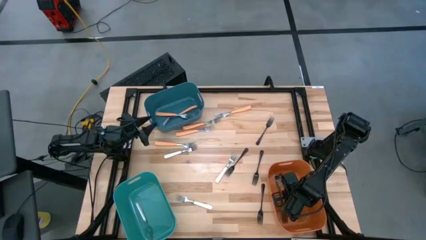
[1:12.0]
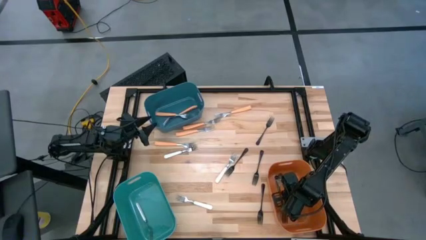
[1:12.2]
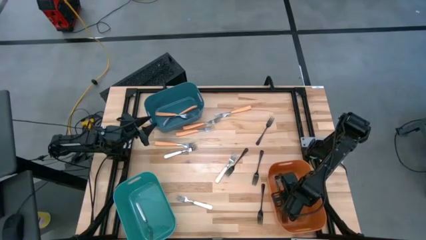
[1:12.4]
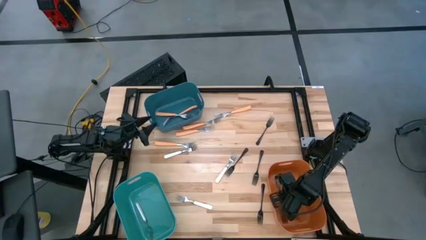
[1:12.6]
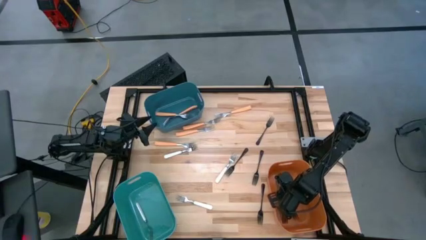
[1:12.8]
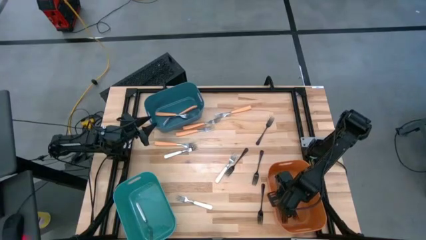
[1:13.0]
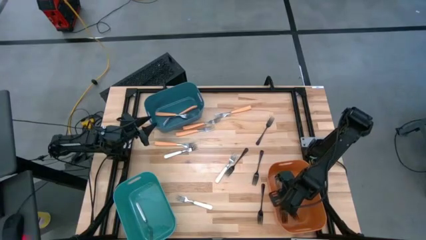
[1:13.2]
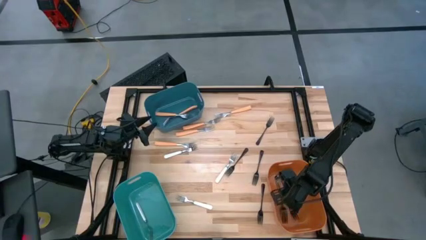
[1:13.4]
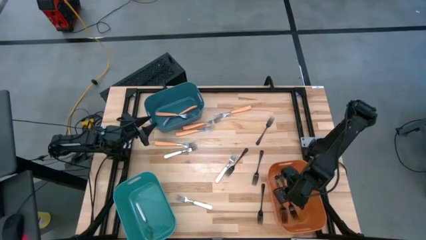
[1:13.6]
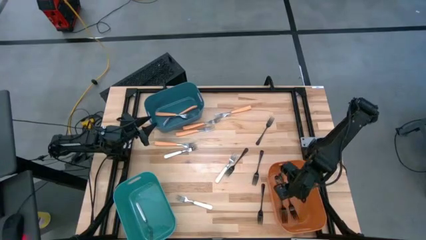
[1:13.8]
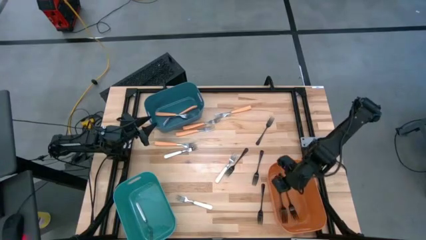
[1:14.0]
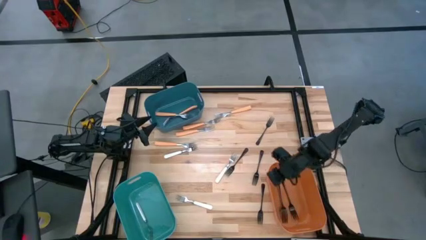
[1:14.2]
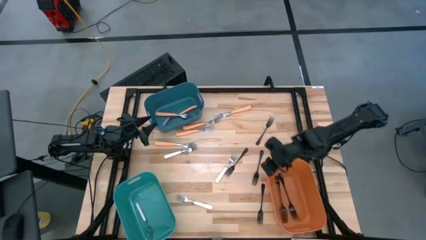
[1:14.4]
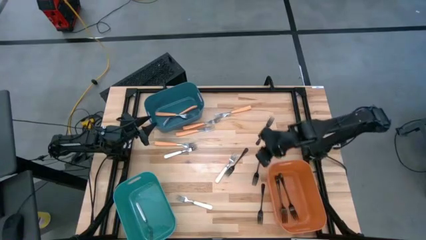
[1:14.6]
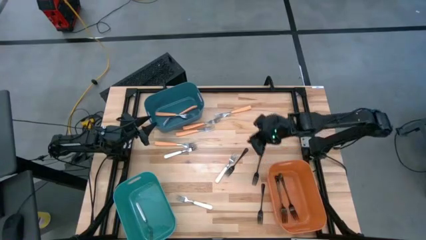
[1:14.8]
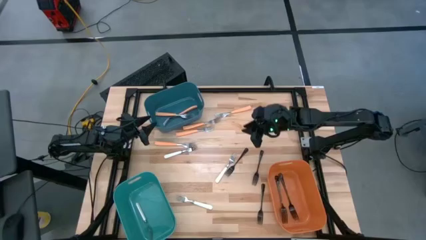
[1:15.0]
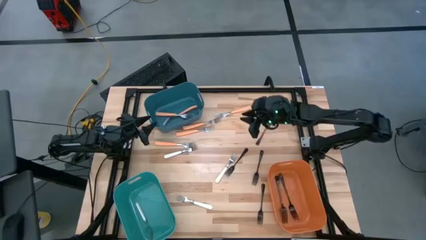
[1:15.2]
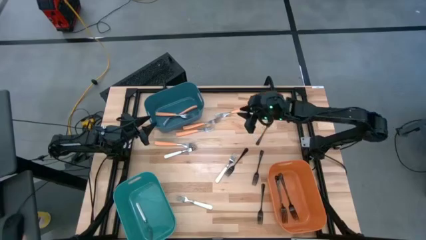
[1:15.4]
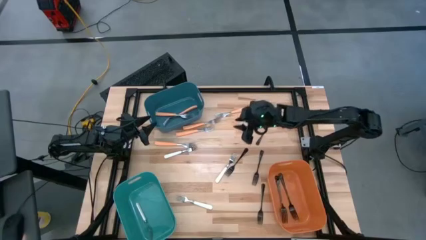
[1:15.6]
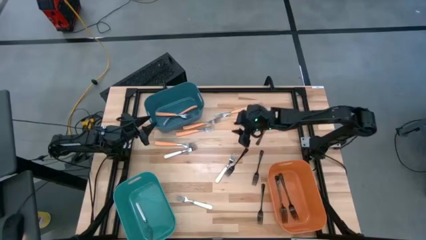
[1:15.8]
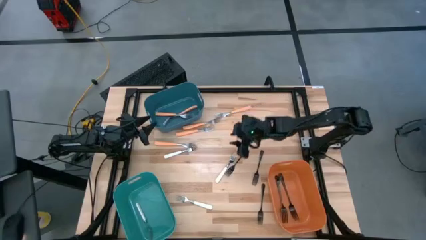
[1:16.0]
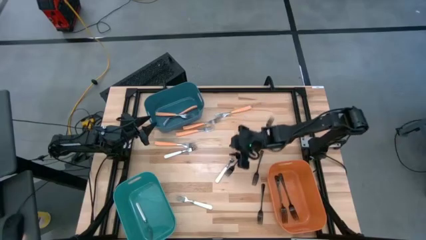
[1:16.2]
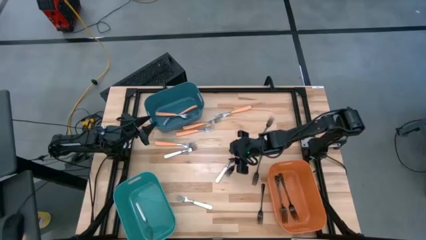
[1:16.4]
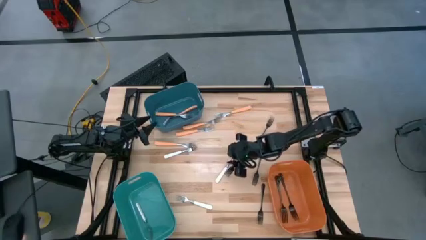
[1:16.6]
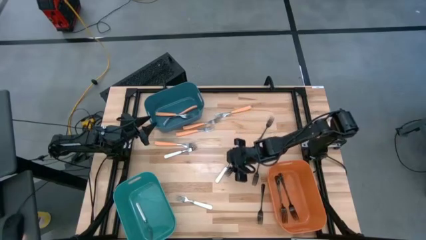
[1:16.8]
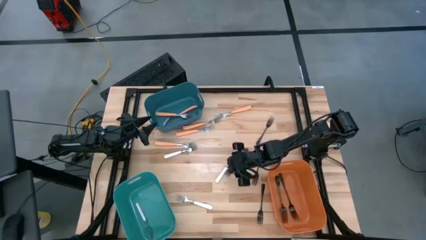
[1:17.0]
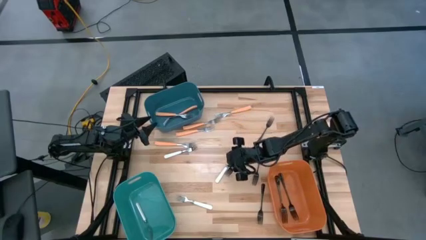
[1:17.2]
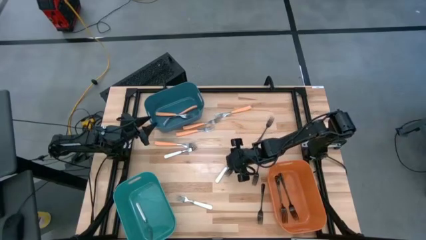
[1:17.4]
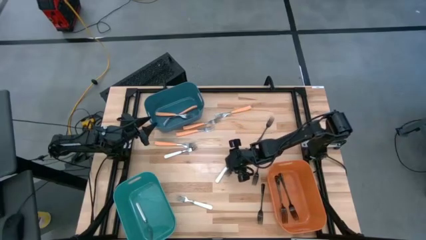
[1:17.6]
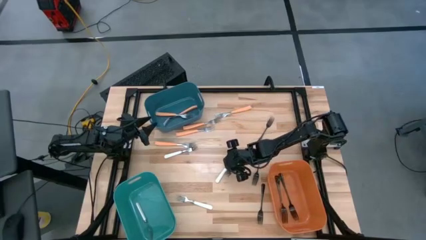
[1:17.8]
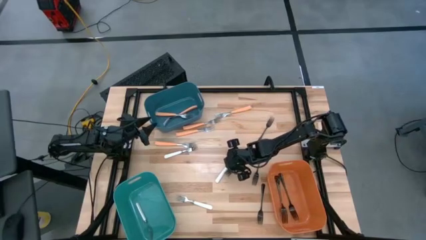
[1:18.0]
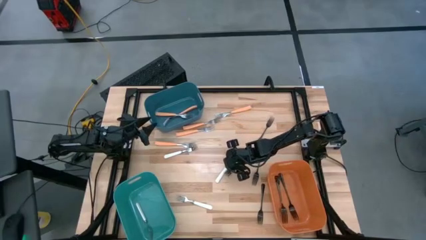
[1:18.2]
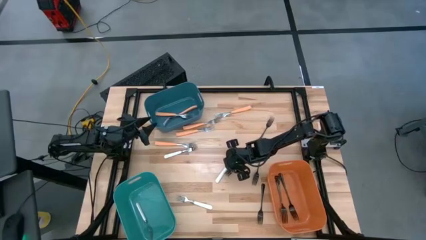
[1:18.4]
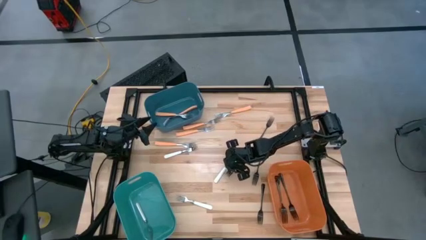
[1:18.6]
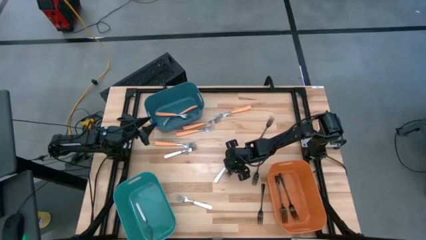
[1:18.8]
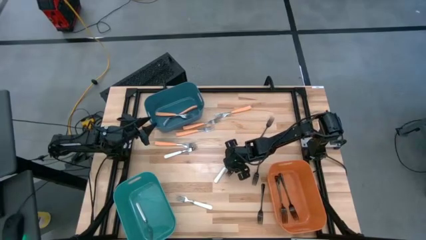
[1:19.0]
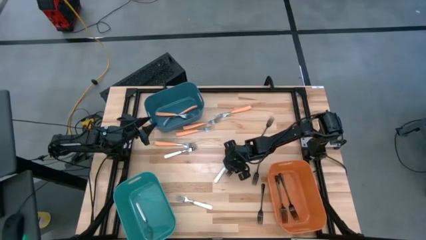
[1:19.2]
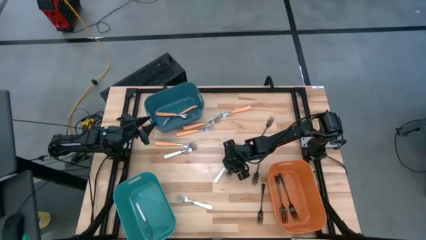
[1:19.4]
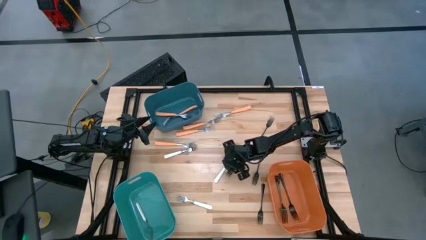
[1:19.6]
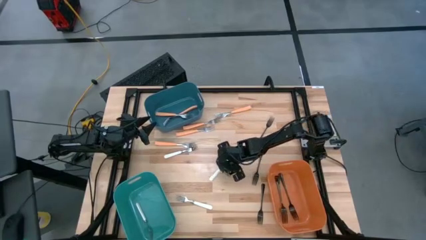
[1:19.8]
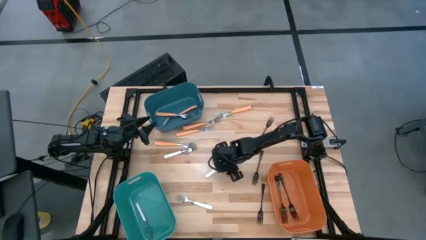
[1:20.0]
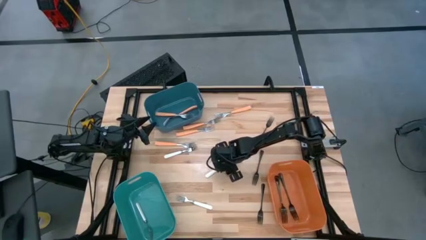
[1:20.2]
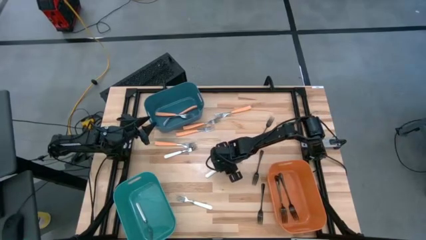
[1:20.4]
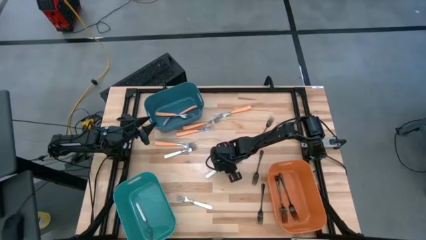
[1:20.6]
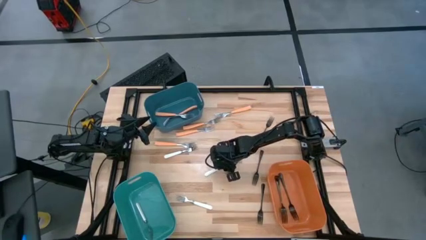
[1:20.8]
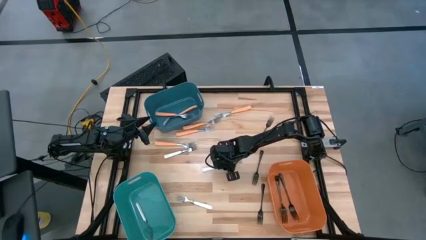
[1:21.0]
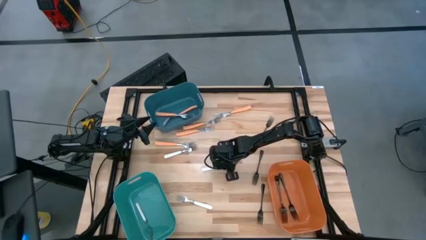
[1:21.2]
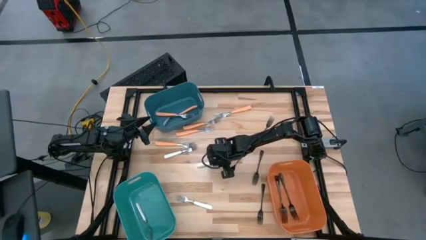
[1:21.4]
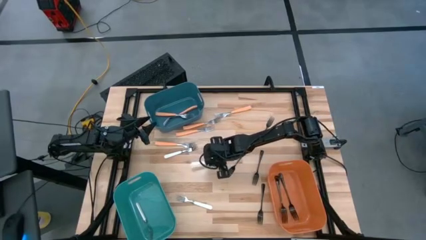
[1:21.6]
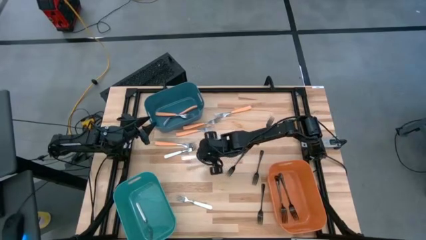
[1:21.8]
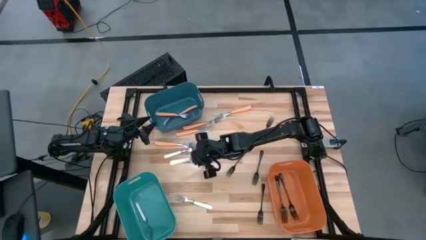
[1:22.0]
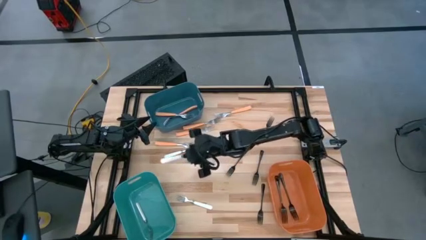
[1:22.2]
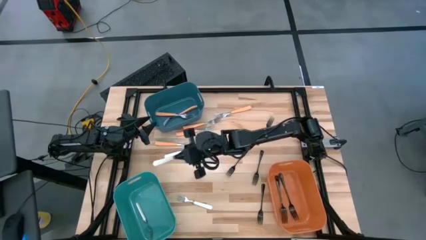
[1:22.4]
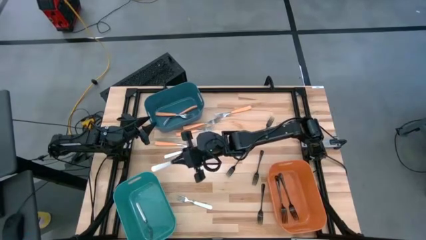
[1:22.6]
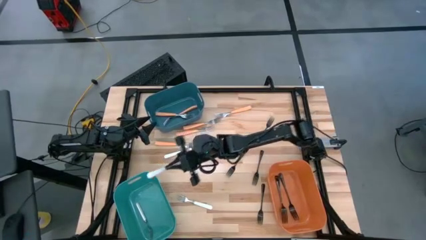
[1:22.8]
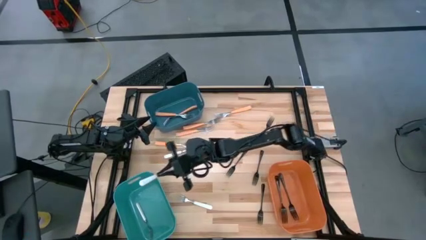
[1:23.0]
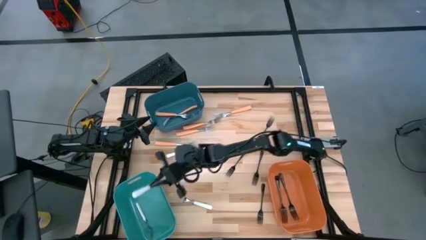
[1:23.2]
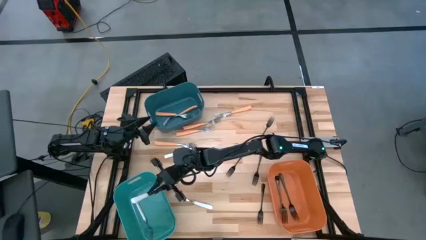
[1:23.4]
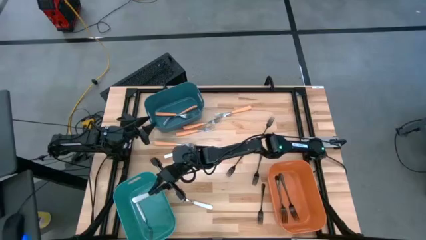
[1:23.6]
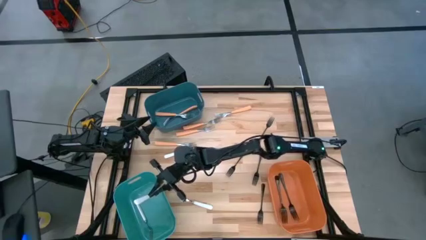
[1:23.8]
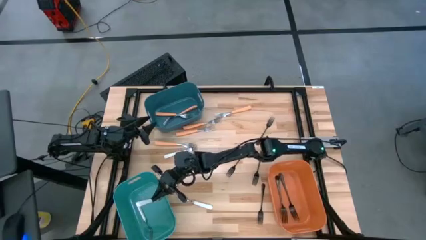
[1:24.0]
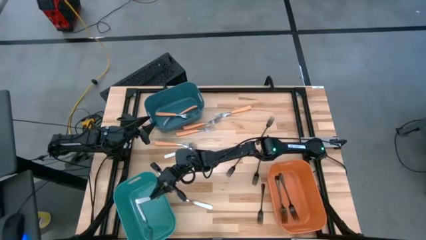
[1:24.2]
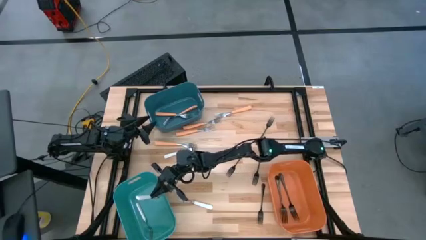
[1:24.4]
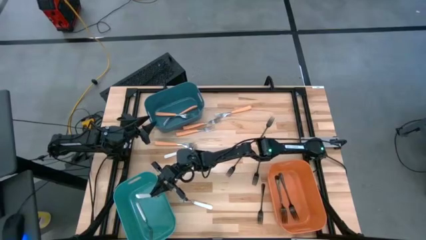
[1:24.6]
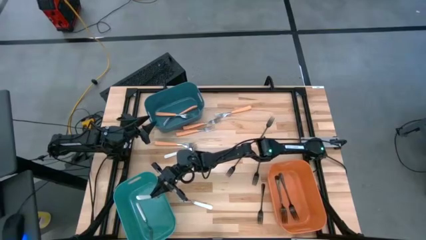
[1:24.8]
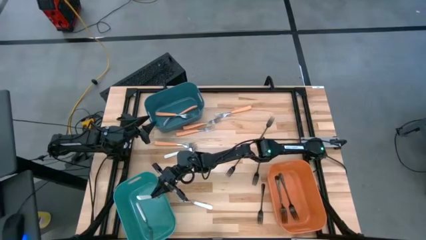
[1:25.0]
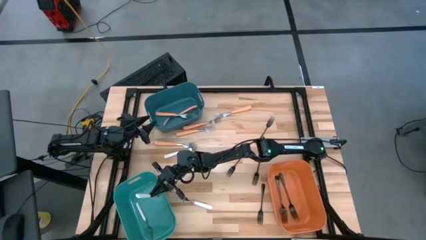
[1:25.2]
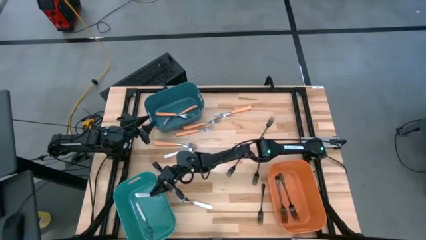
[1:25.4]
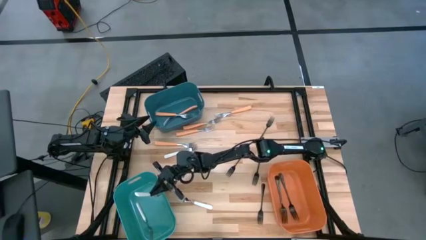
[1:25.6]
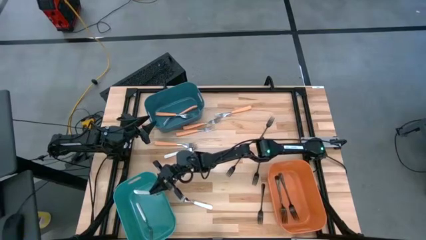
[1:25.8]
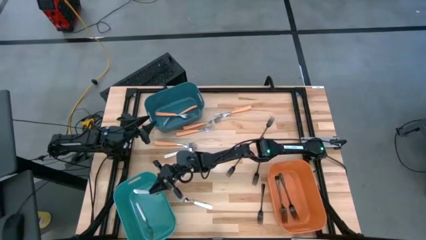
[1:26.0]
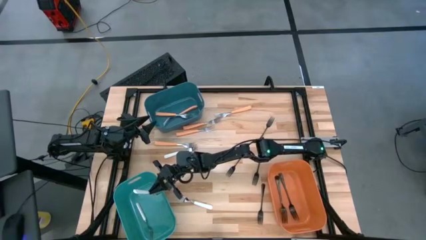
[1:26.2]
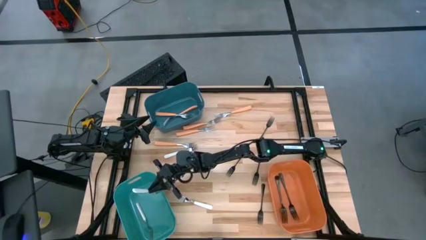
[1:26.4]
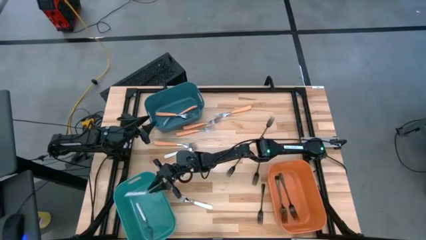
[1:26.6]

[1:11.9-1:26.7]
Task: Sort silverware by color (type)
Put the white fork into the green bin
